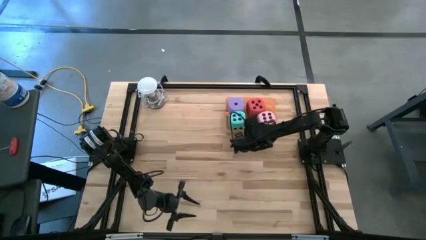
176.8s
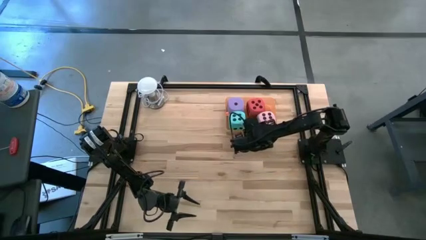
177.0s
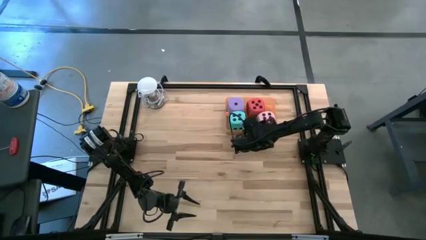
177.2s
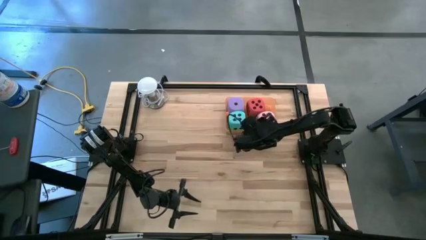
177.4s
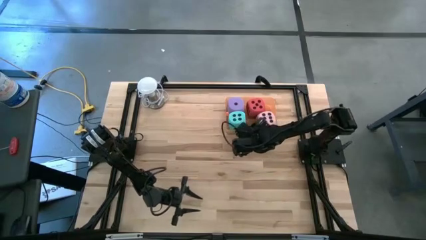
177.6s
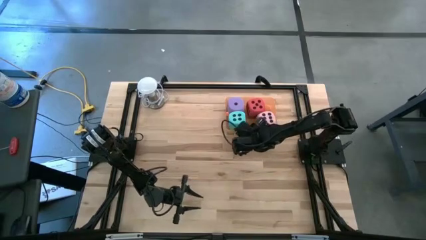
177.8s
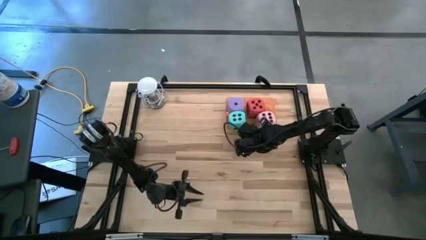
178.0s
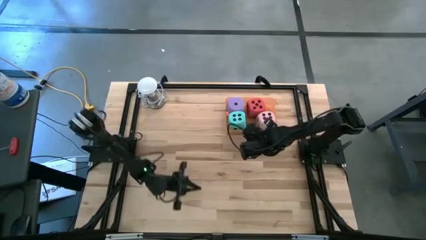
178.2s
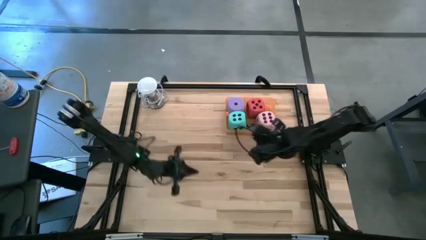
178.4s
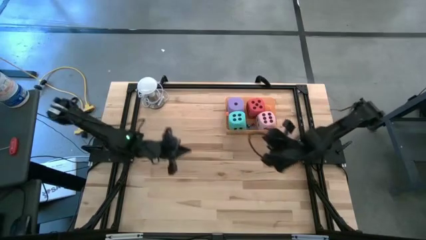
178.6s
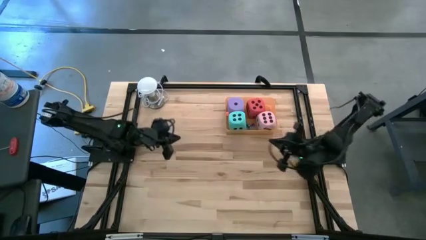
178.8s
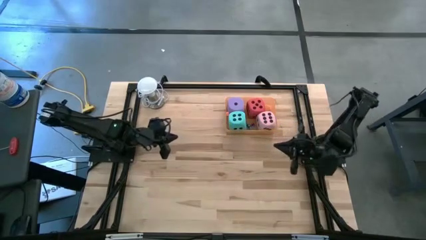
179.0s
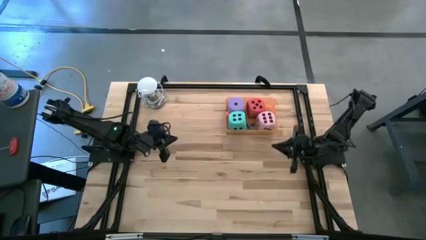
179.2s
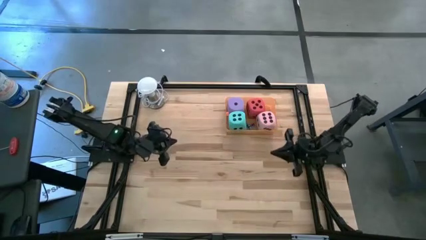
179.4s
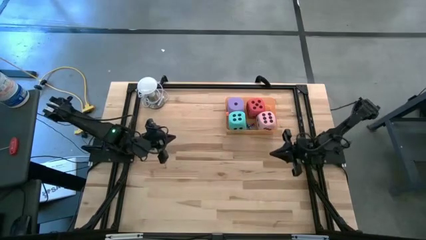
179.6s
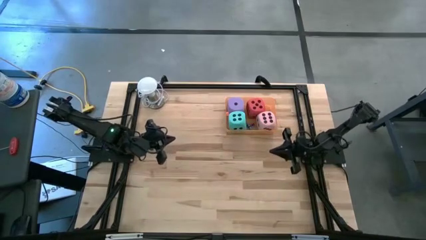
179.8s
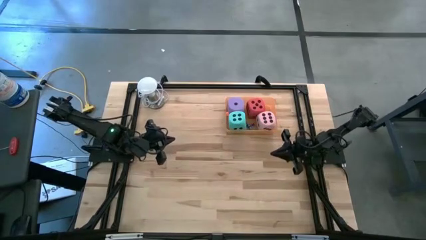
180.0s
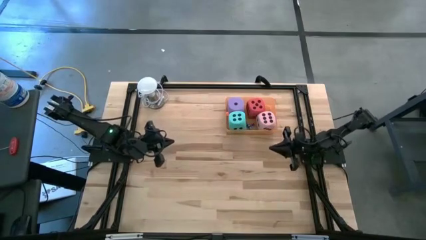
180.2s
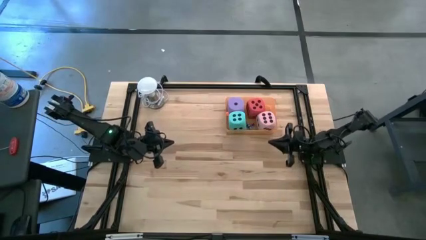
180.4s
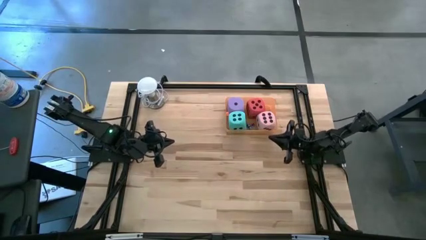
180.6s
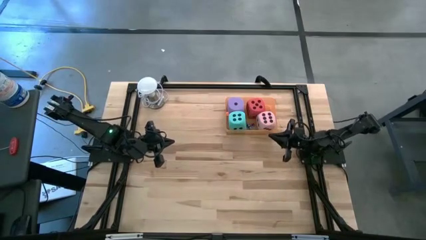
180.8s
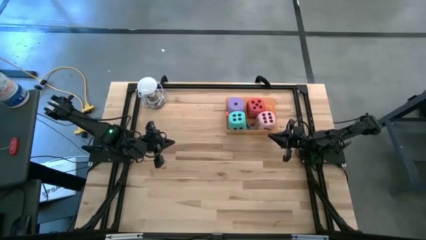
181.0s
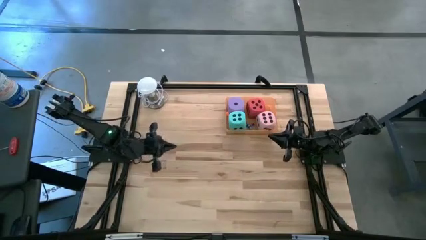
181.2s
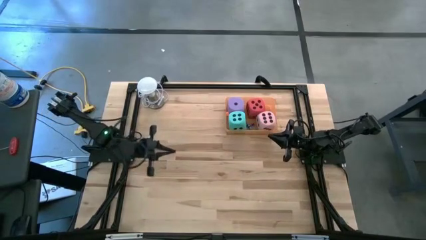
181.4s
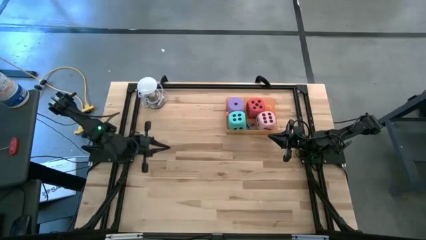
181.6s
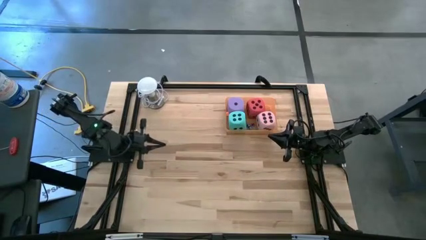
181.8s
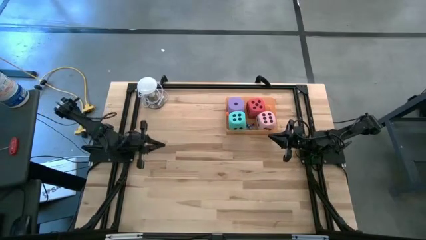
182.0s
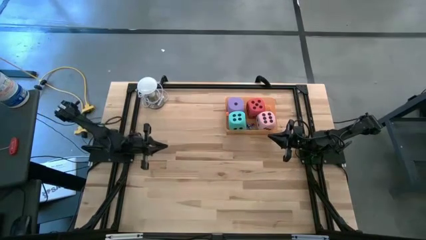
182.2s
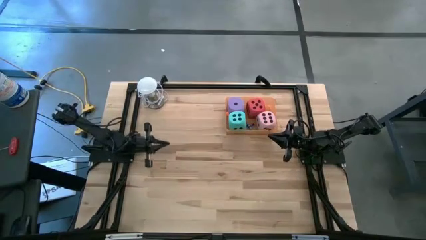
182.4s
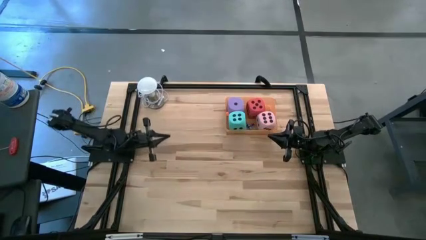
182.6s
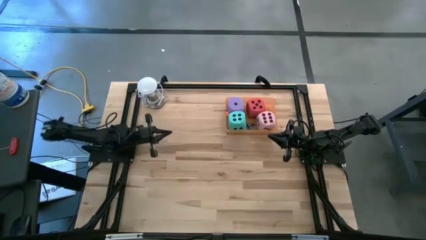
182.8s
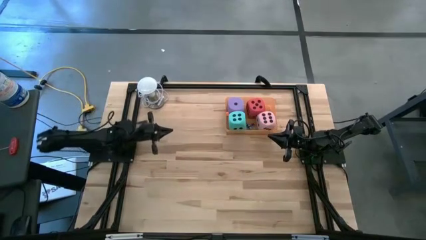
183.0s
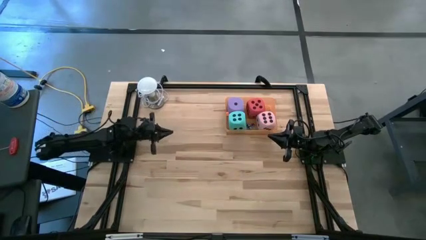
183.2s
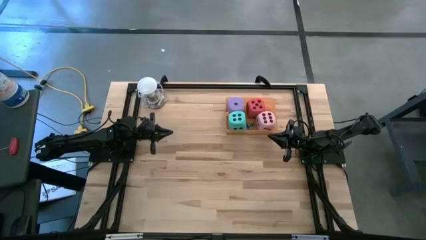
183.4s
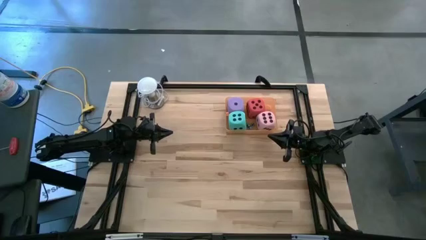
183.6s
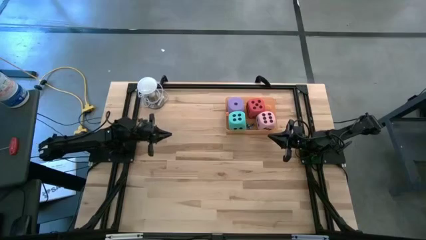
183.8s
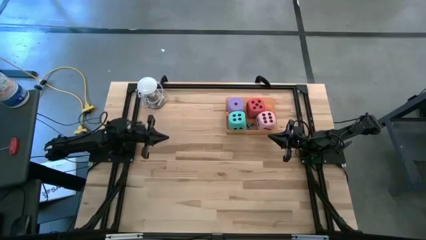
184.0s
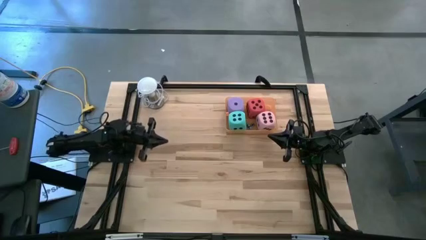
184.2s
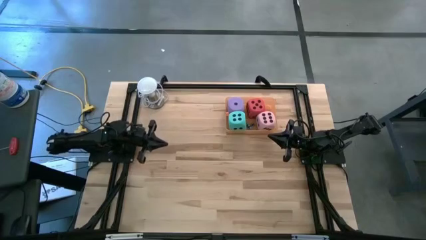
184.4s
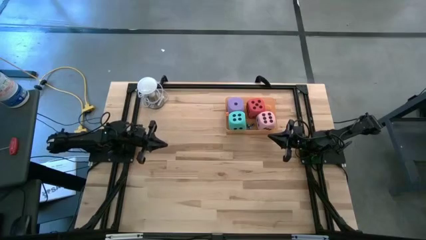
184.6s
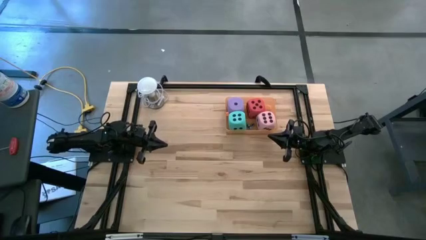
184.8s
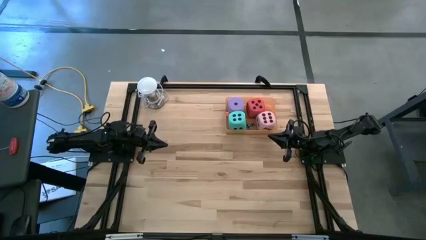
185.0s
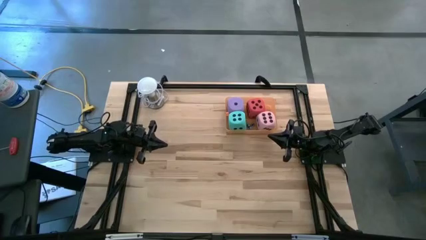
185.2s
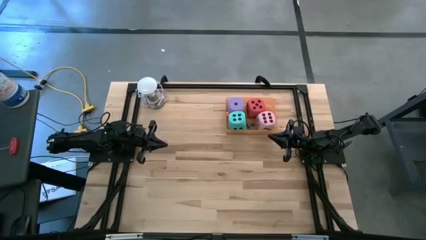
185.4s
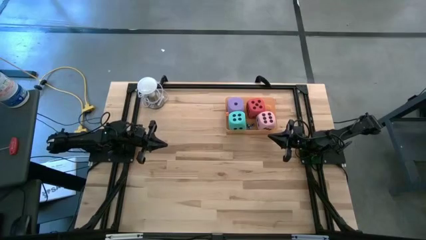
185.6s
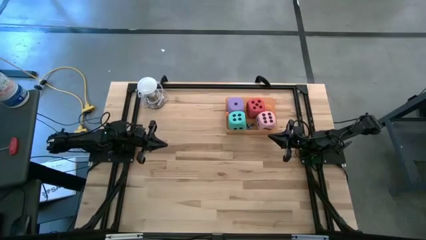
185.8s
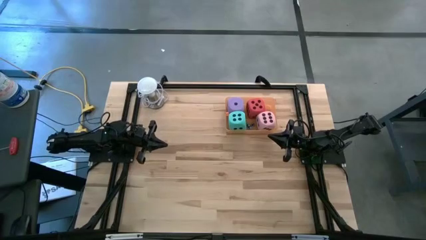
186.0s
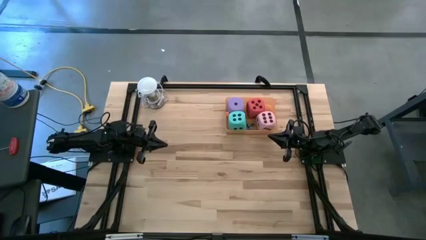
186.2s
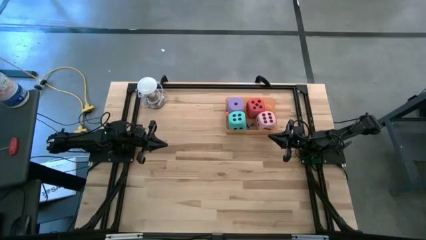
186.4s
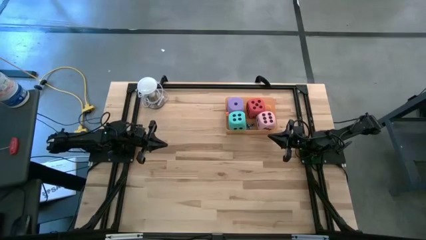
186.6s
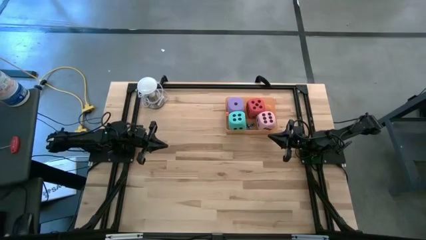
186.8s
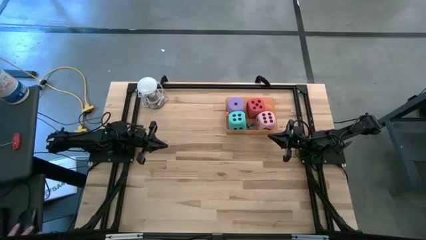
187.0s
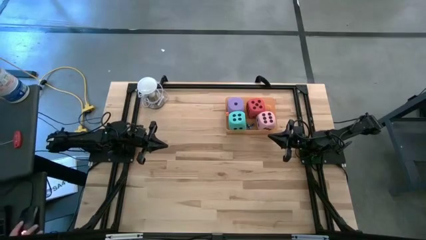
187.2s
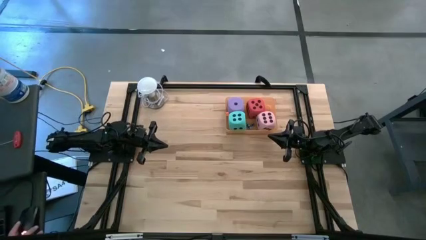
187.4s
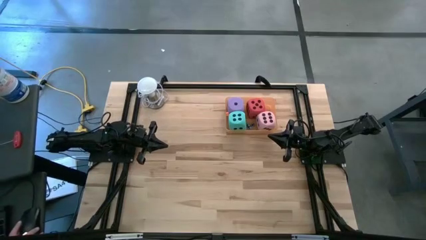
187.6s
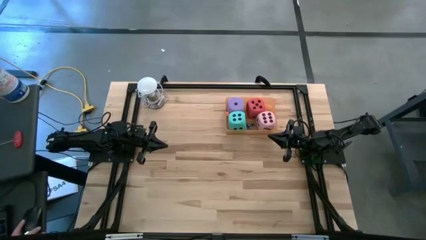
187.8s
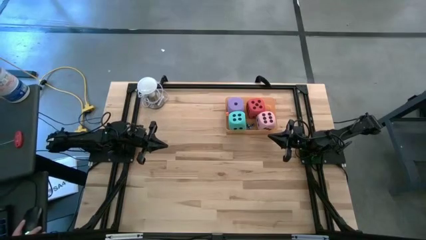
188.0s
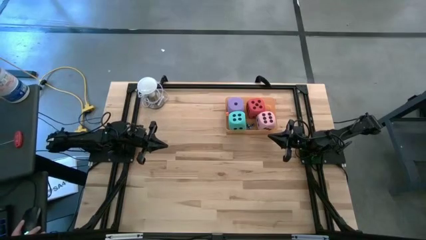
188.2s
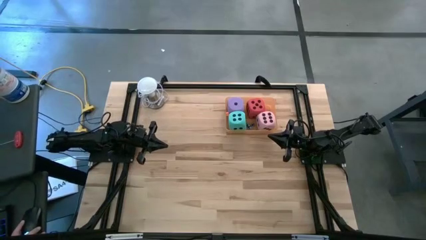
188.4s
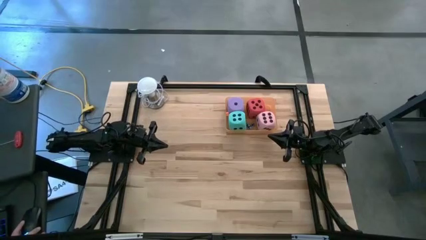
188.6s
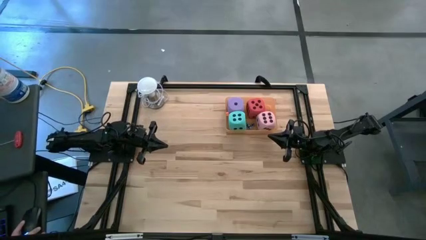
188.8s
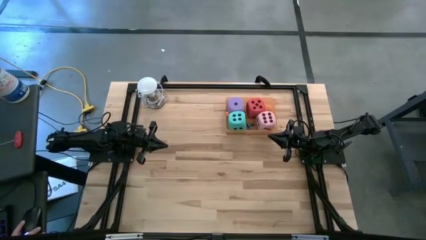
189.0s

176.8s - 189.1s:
Task: Pick & Place Dice
Return to Home Position

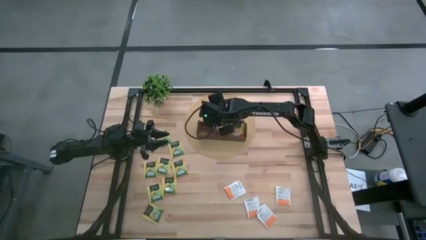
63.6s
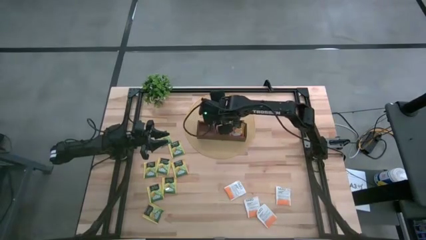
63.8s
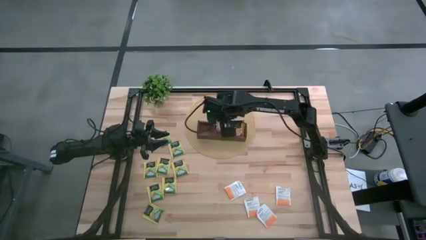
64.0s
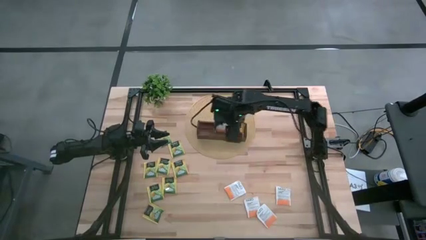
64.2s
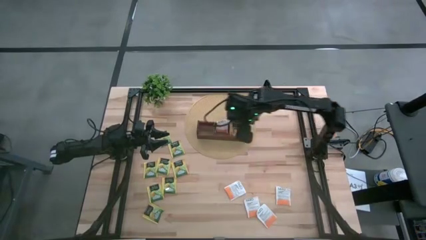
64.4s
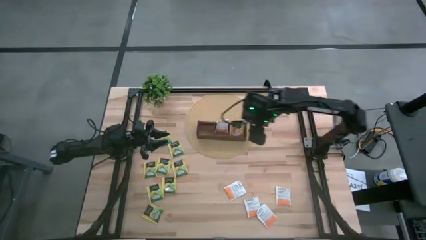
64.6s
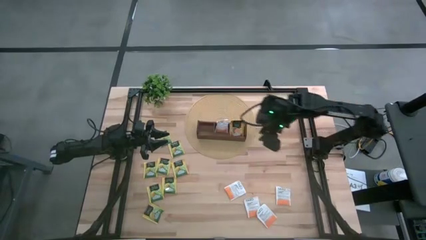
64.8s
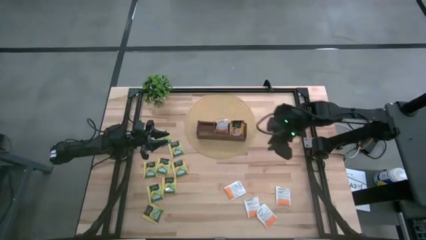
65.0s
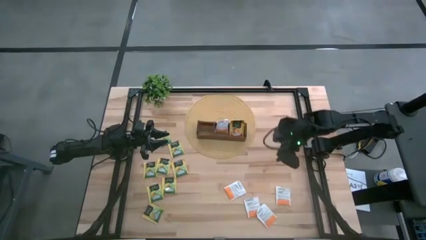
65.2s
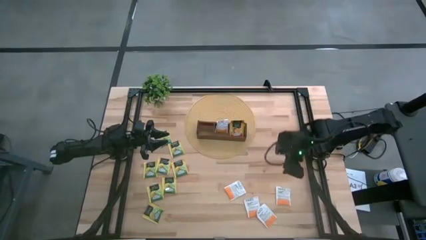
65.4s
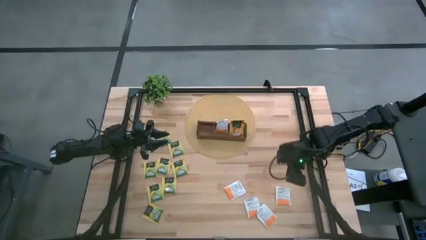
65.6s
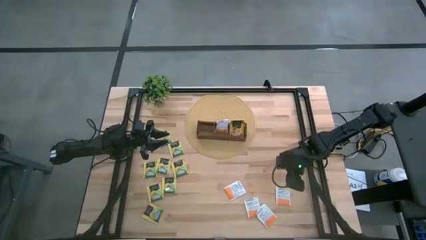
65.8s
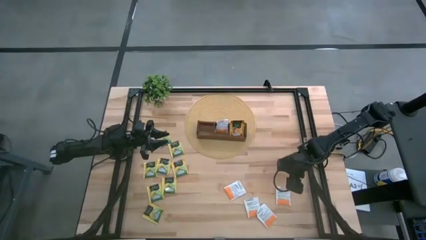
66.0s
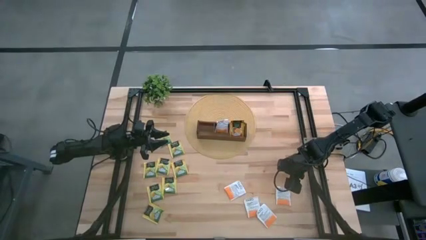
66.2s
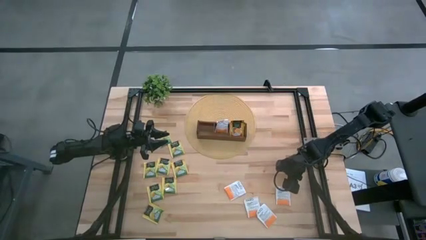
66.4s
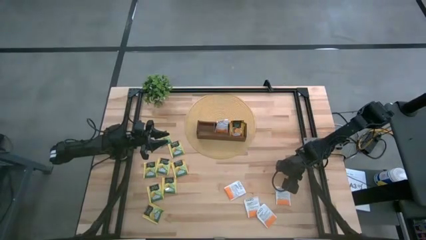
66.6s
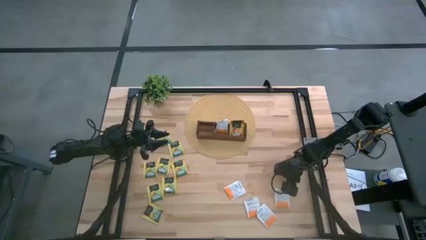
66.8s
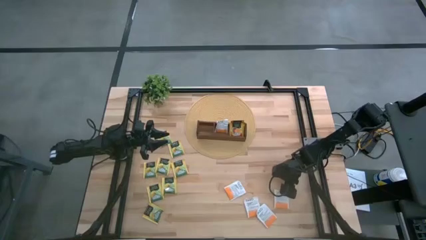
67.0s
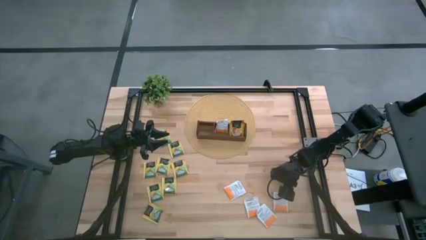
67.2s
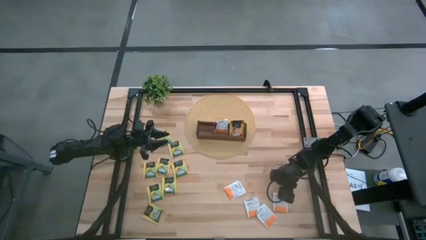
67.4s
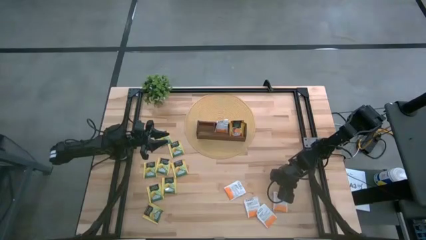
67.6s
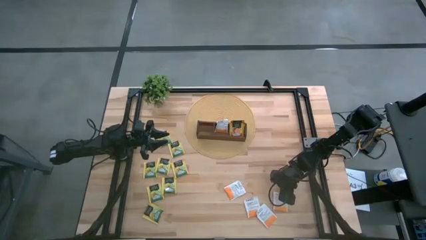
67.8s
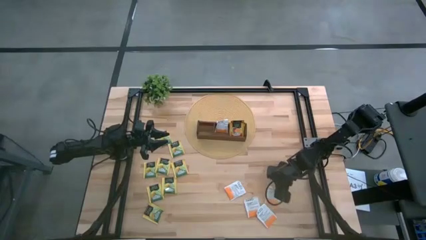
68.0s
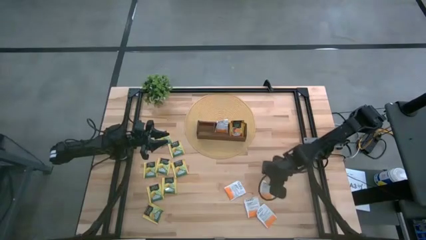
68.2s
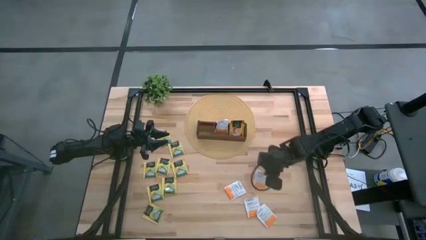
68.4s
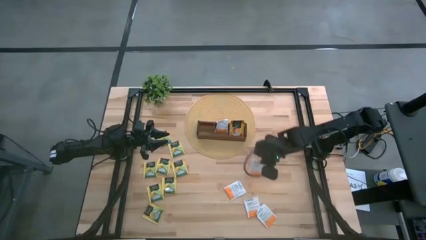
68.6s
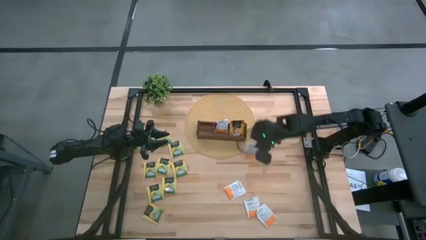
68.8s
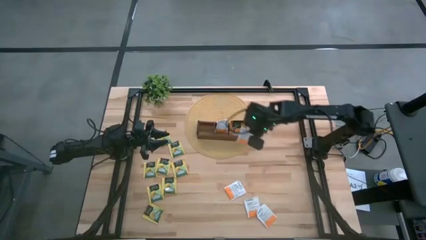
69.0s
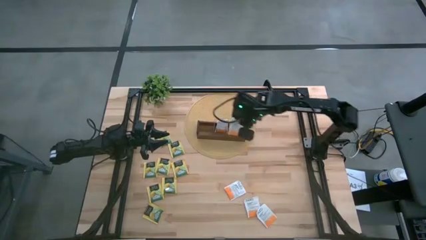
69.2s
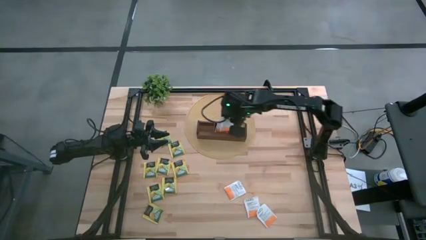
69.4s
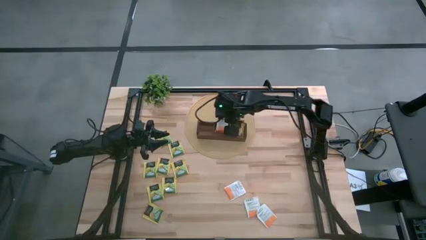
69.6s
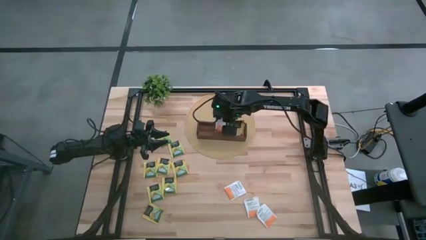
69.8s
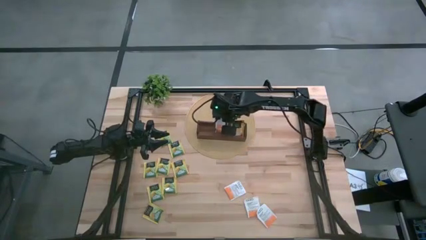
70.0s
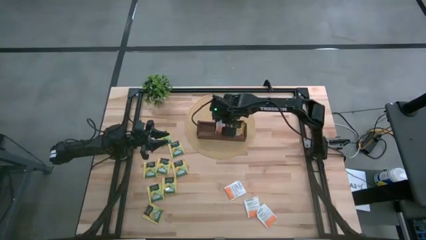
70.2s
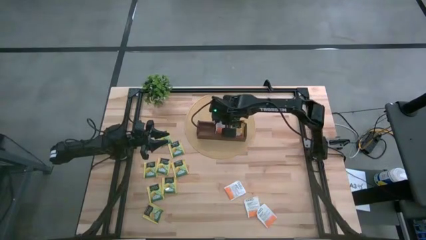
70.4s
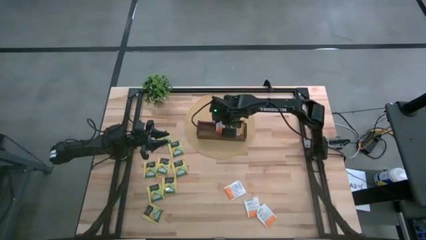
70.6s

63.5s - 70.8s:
Task: Pick & Place Tea
Put the white tea bag into the middle section of the wooden organizer
